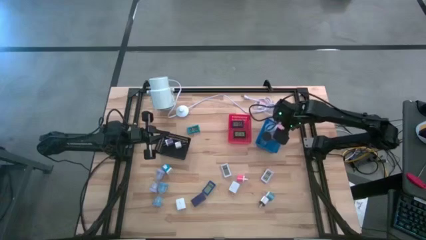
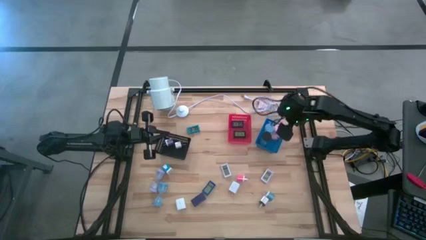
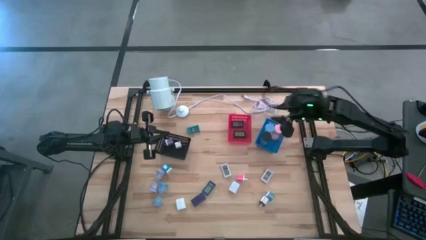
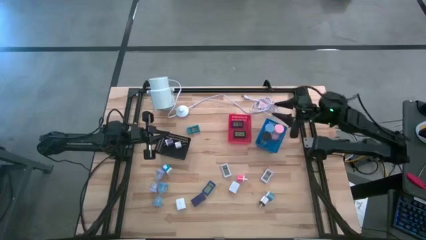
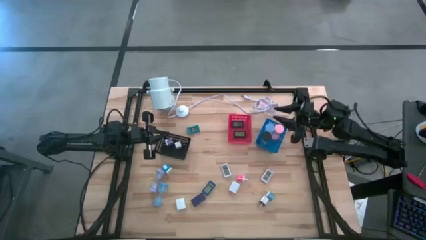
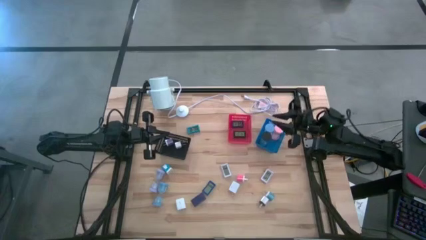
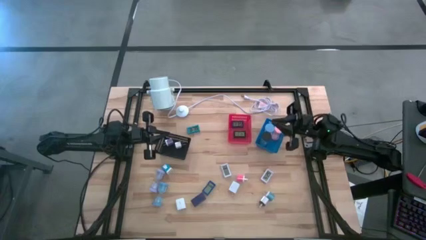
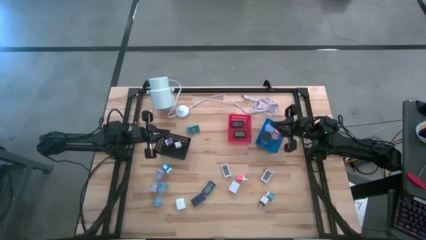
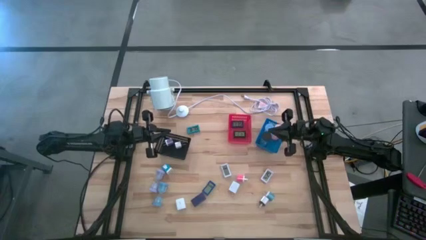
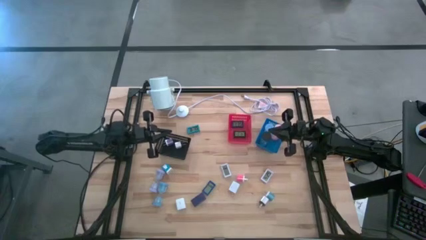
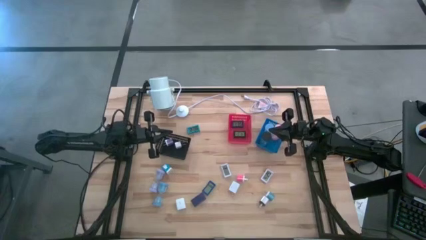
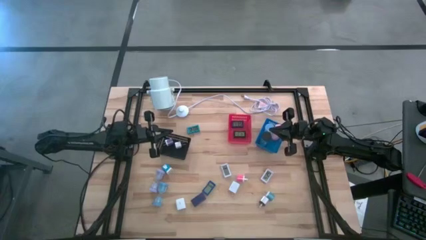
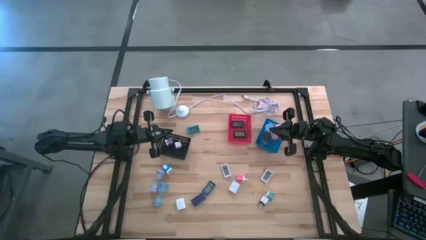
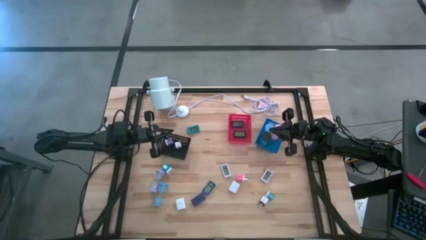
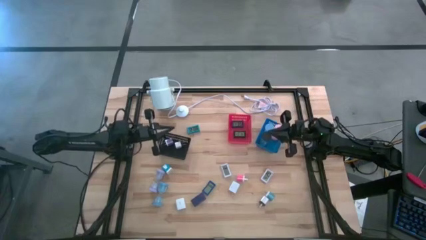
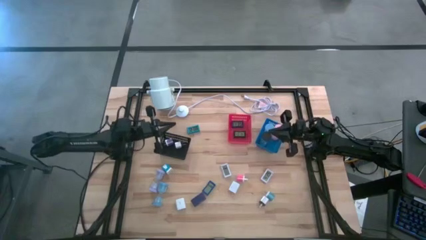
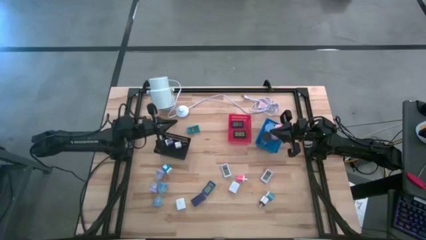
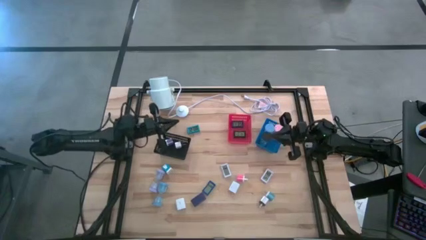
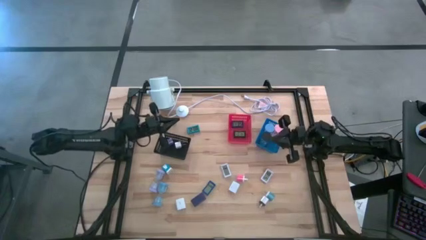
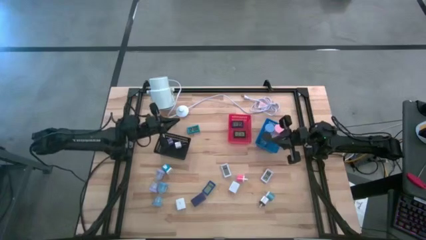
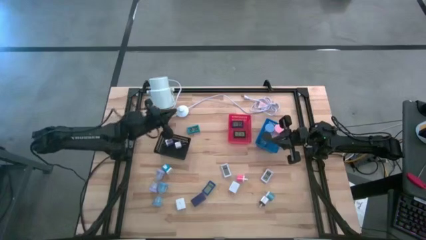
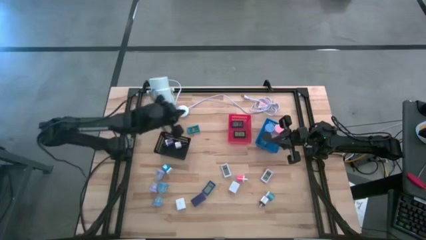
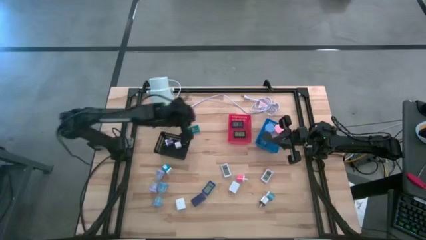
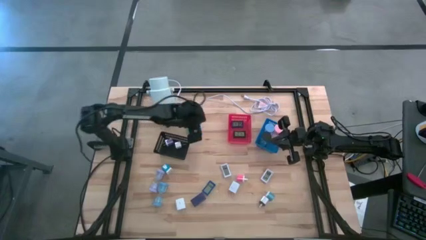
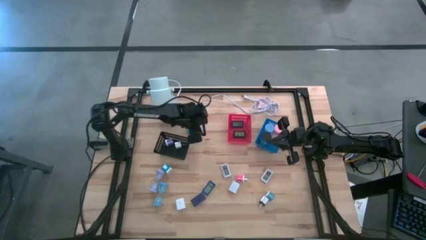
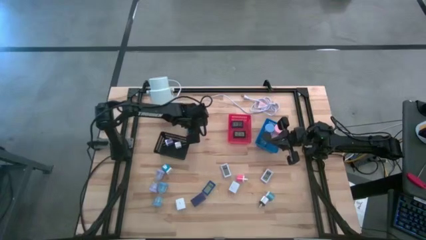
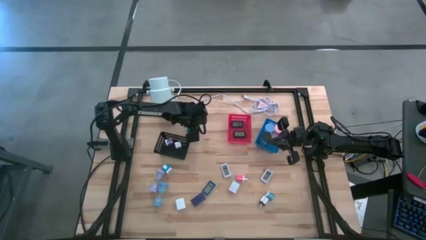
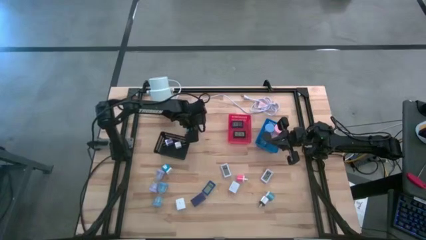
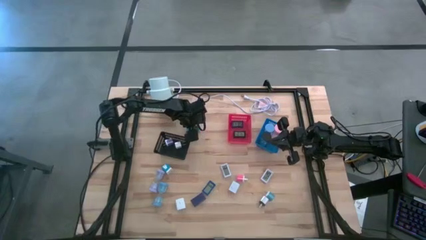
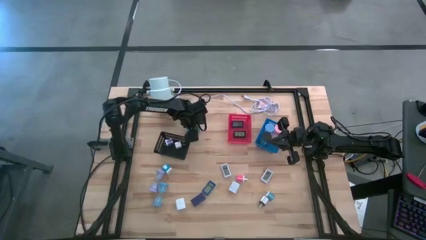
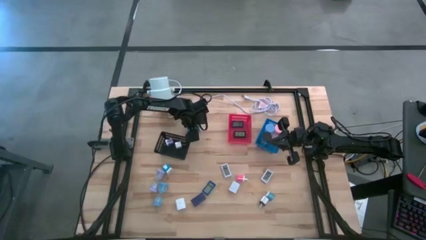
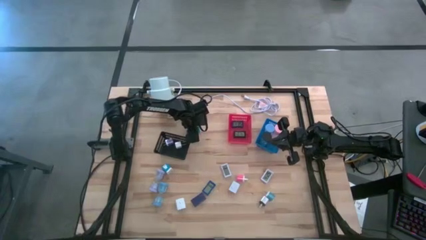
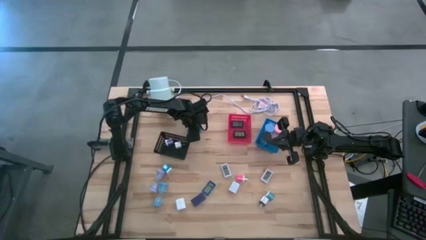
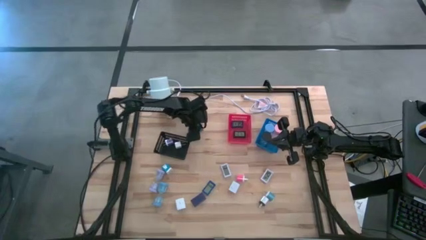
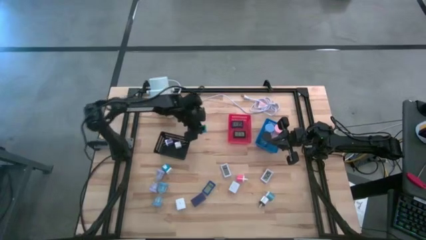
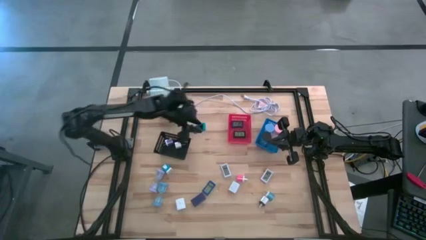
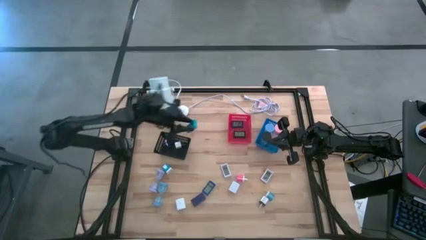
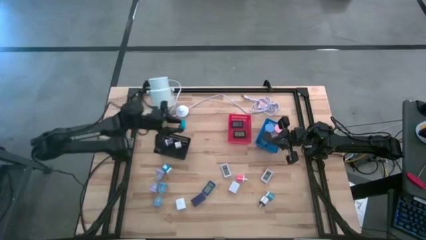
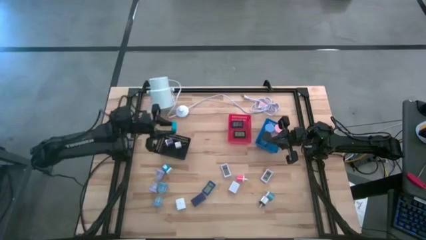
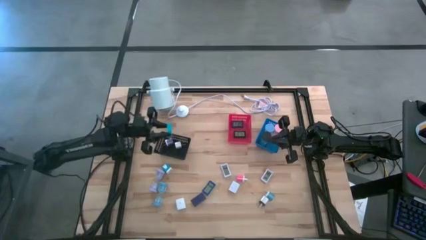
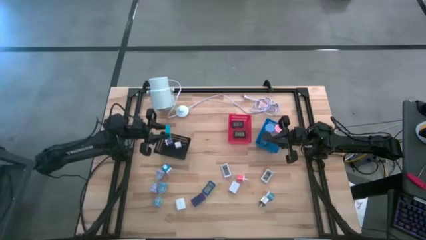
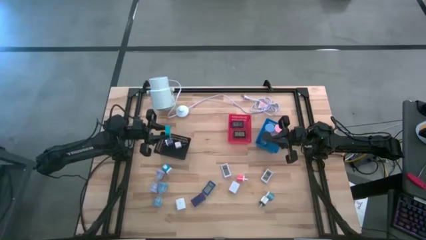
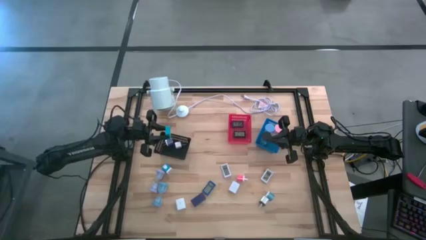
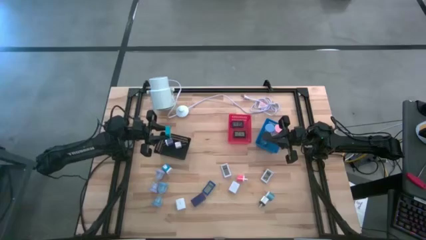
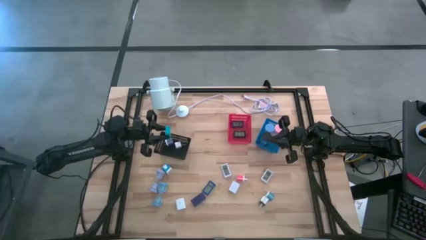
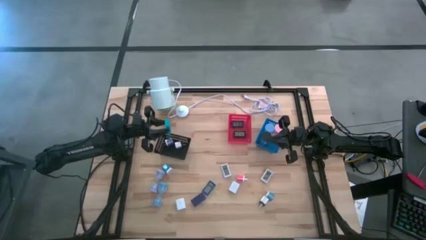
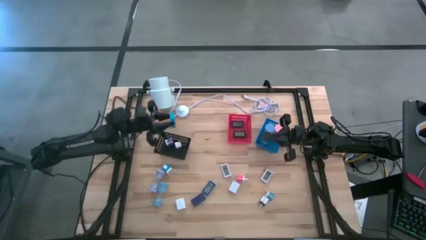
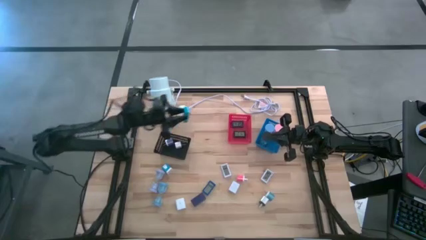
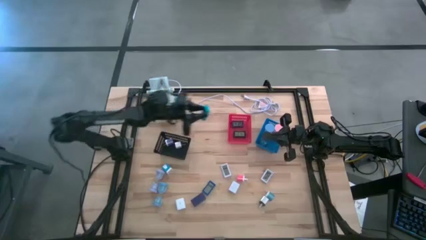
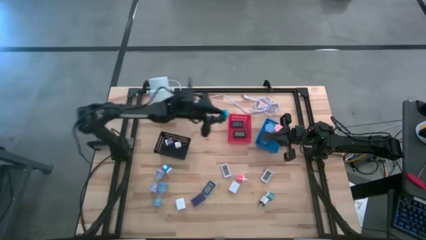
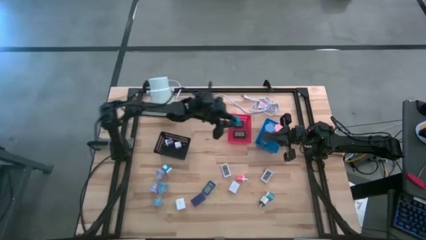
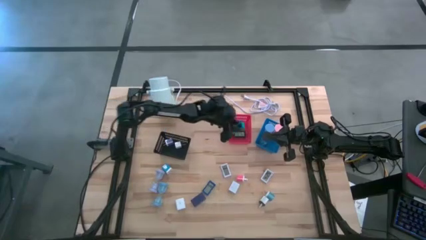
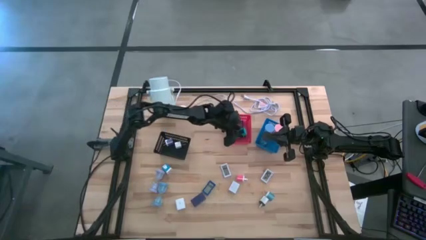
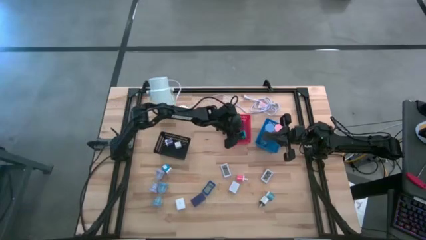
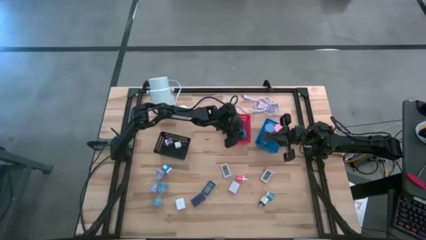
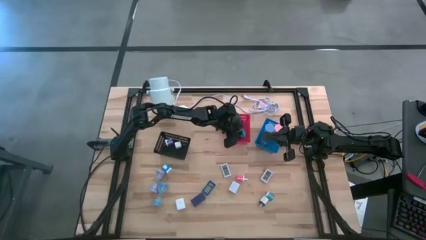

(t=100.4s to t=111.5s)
Task: Pick & Place Office items
Put the light blue digital clock into the red bin

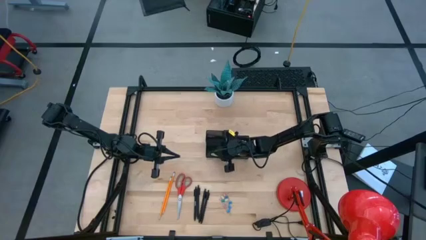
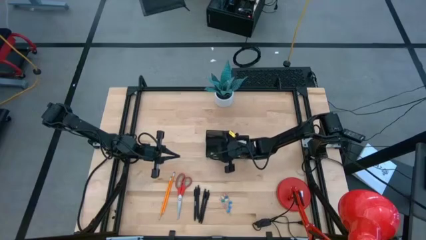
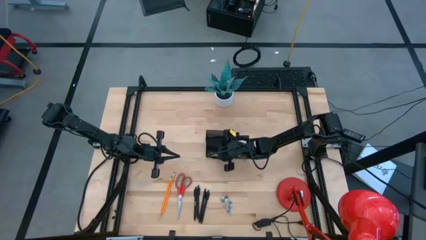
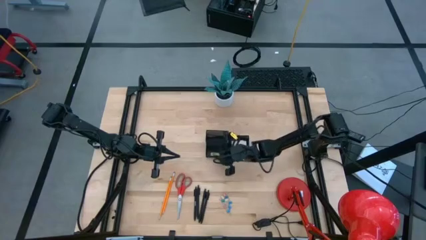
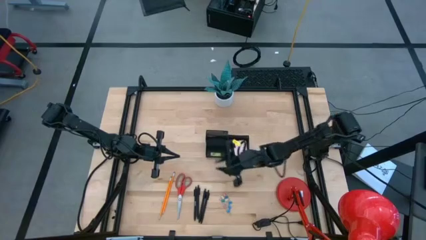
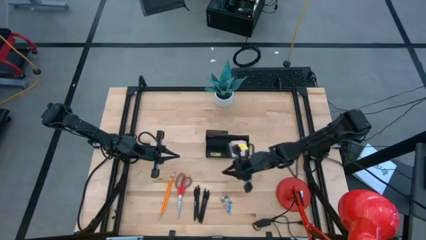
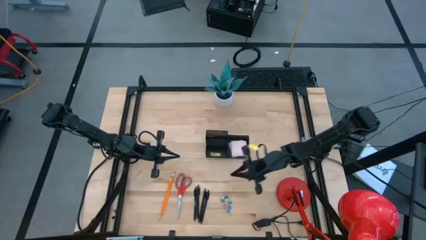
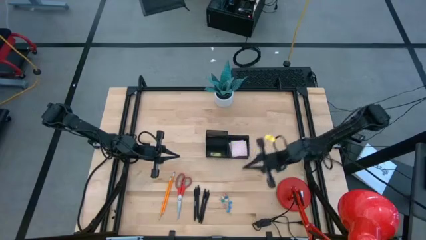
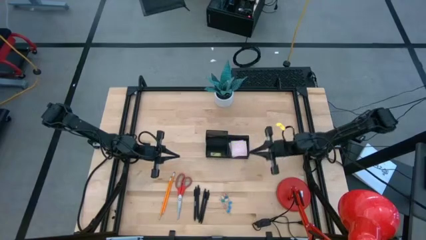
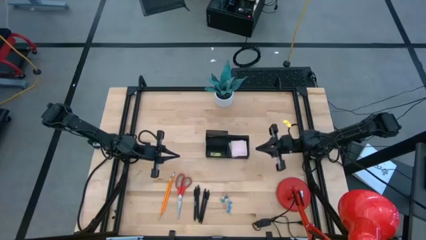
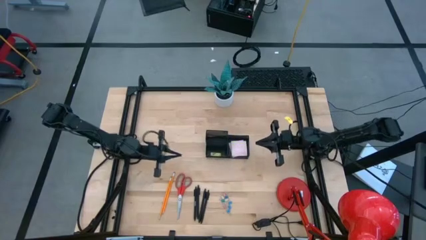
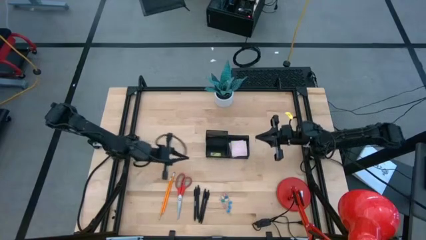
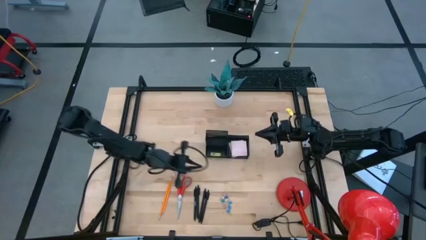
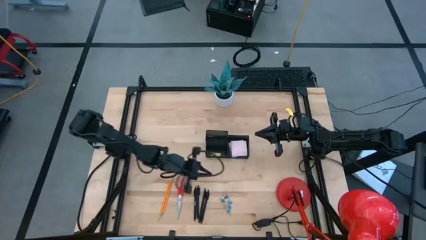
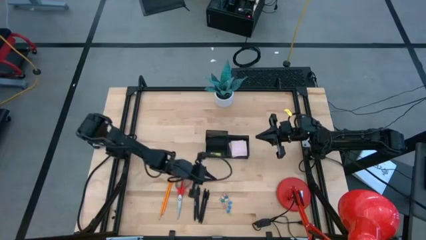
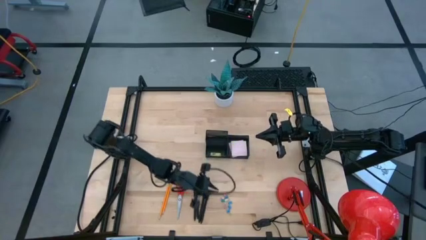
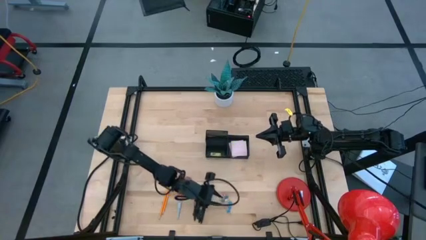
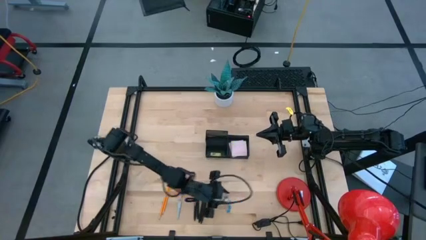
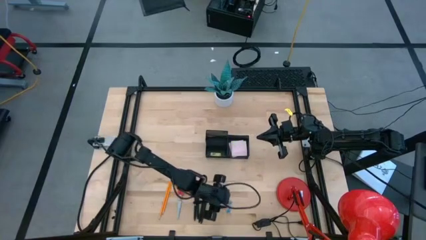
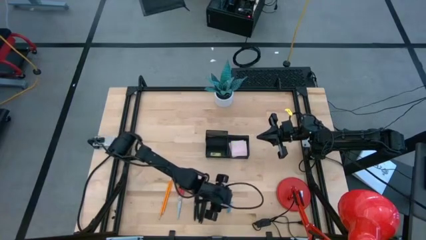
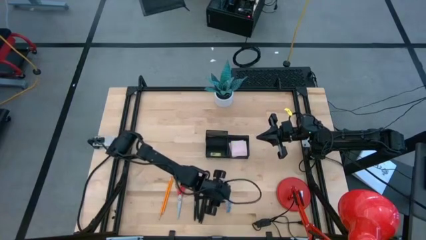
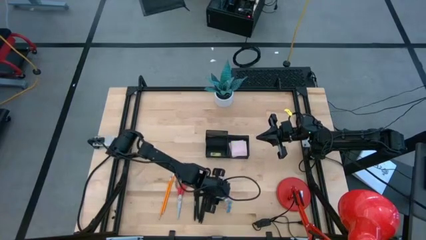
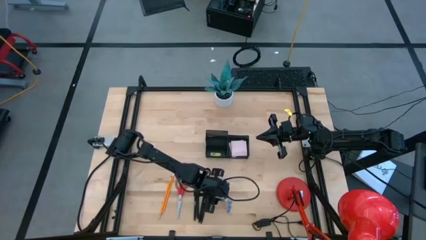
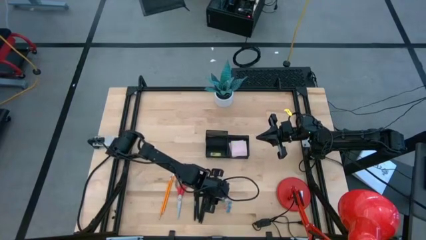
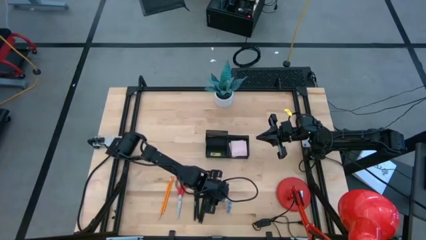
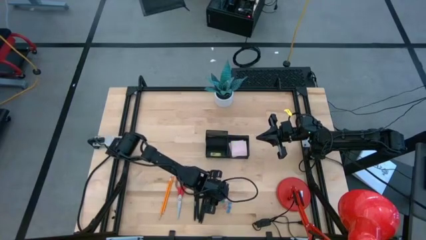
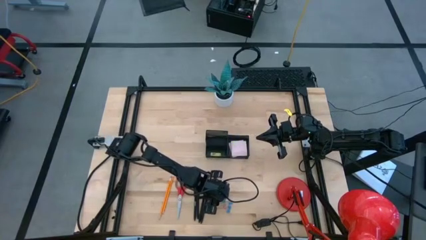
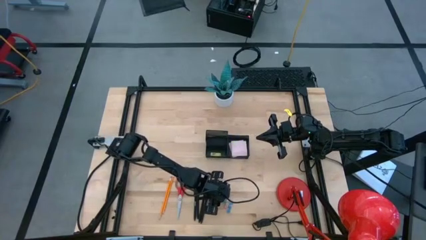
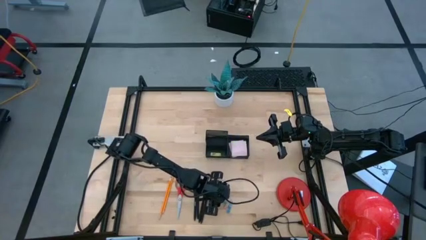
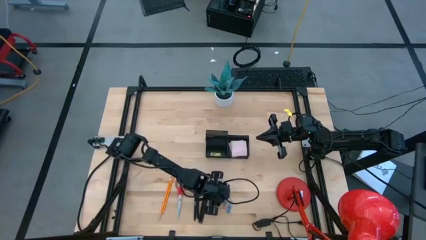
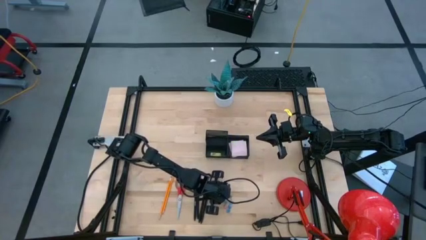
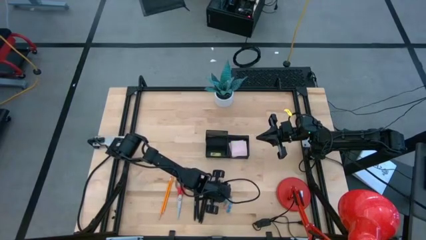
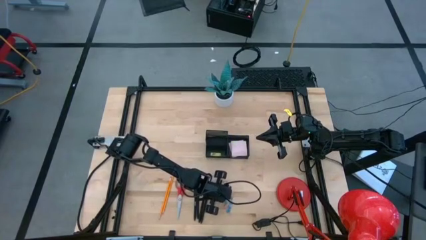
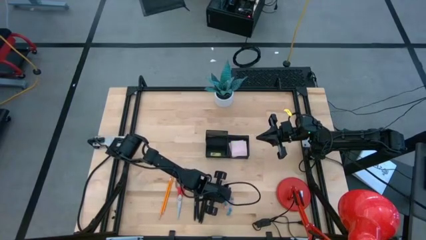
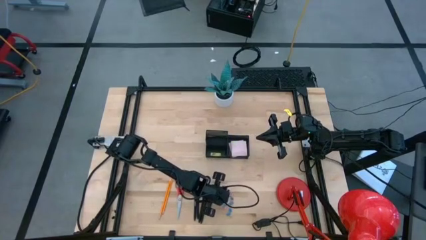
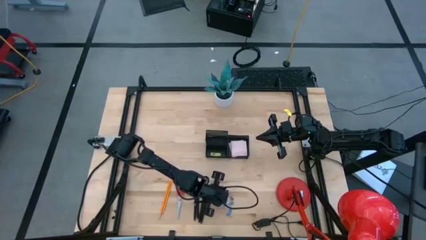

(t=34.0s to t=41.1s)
Task: Pick and place office supplies into organizer
Put the yellow binder clip into the black desk organizer
